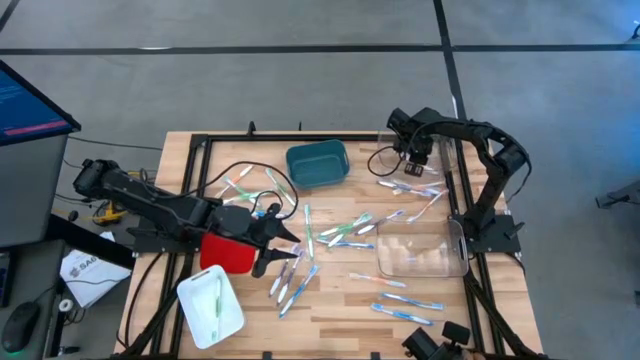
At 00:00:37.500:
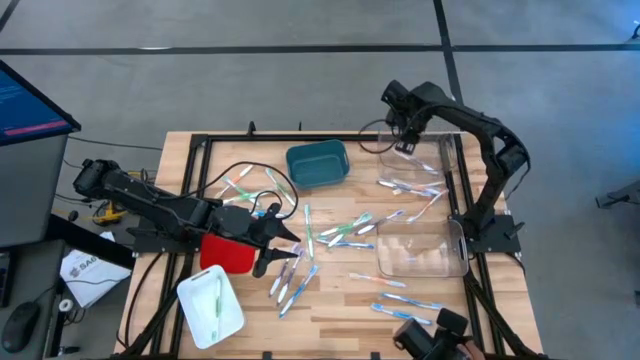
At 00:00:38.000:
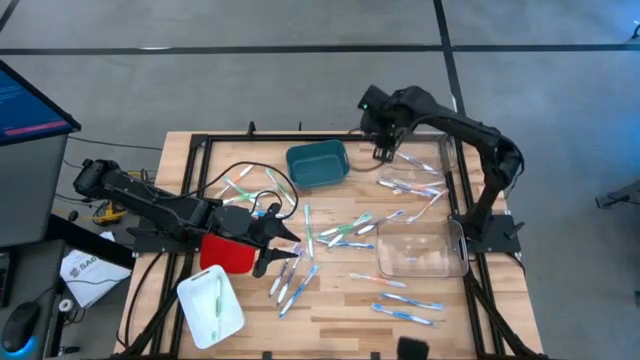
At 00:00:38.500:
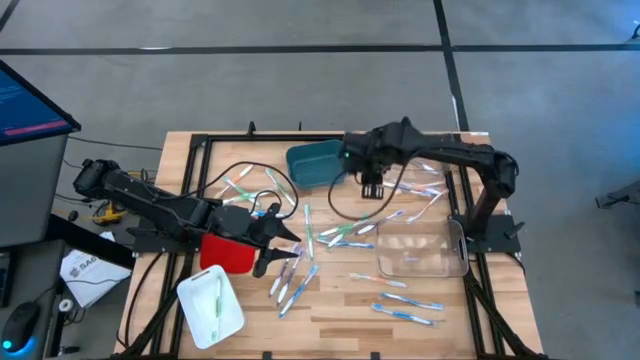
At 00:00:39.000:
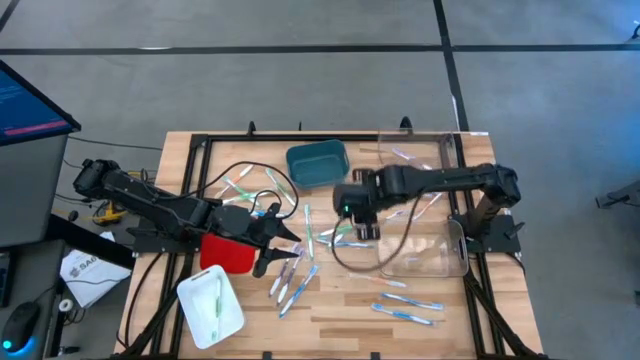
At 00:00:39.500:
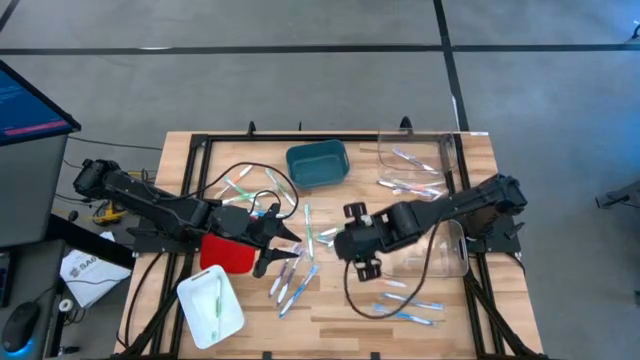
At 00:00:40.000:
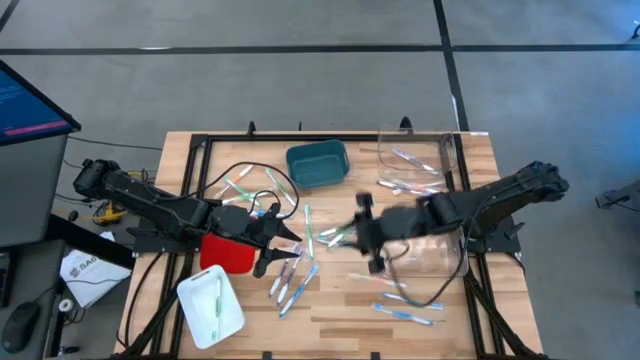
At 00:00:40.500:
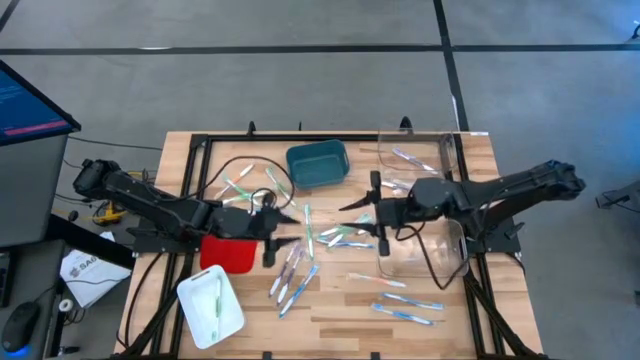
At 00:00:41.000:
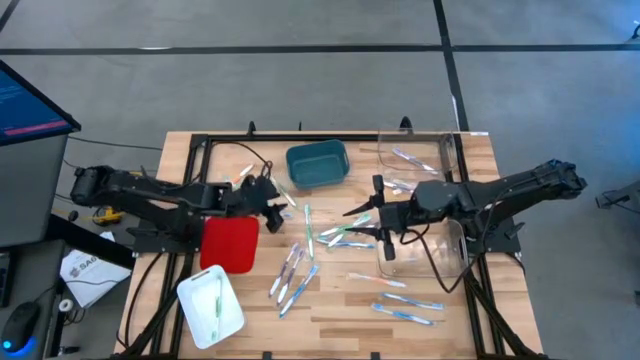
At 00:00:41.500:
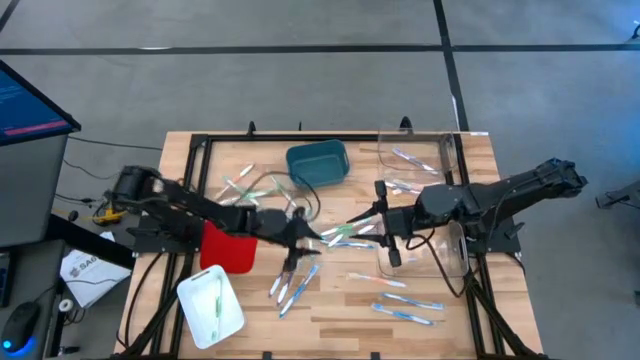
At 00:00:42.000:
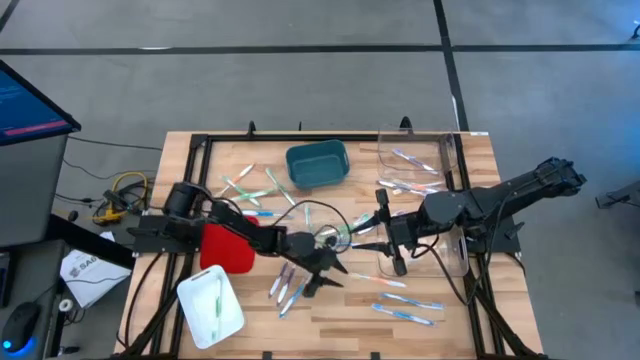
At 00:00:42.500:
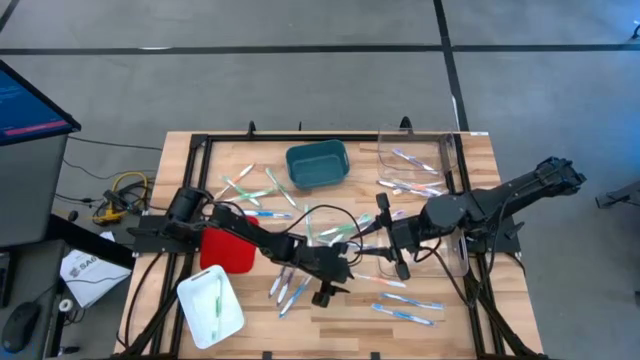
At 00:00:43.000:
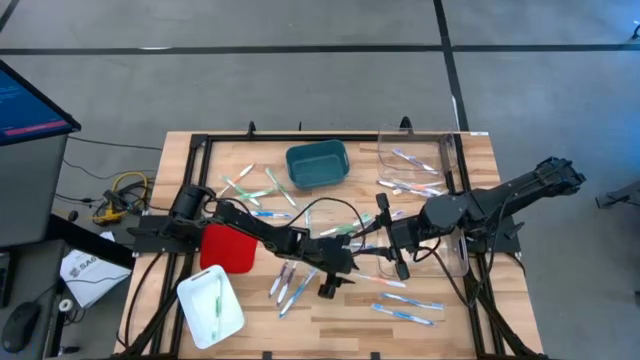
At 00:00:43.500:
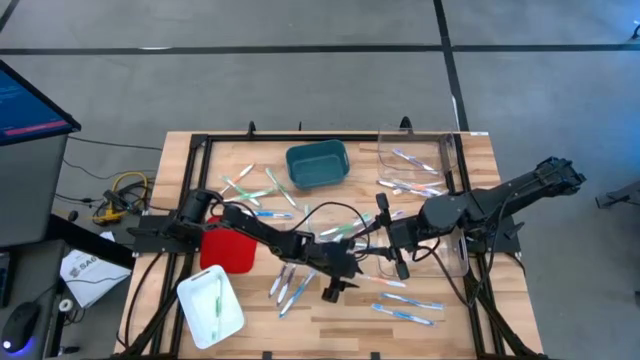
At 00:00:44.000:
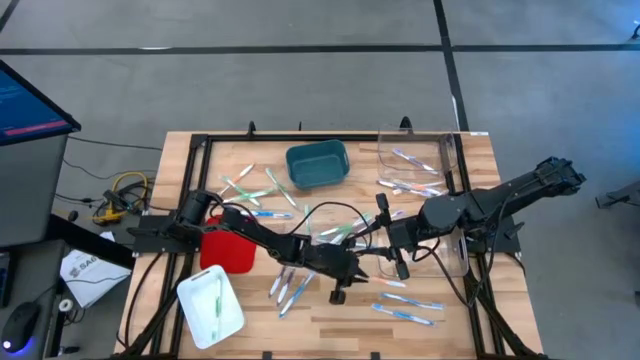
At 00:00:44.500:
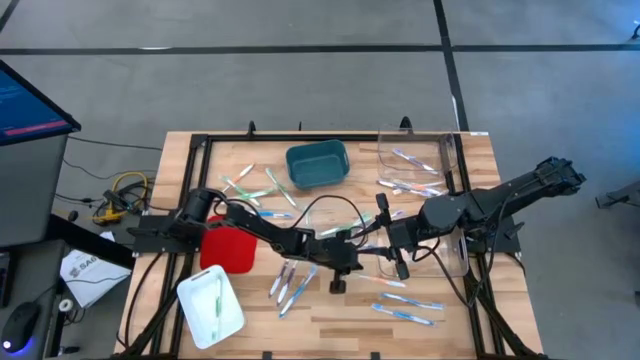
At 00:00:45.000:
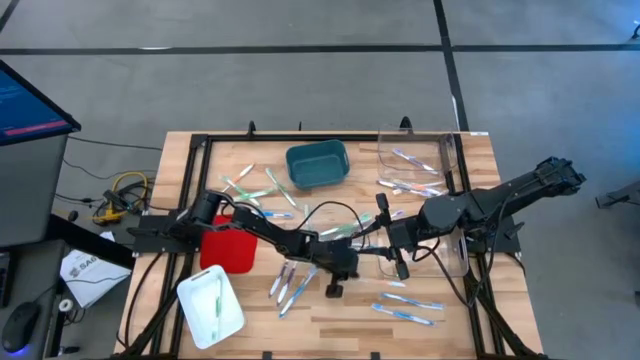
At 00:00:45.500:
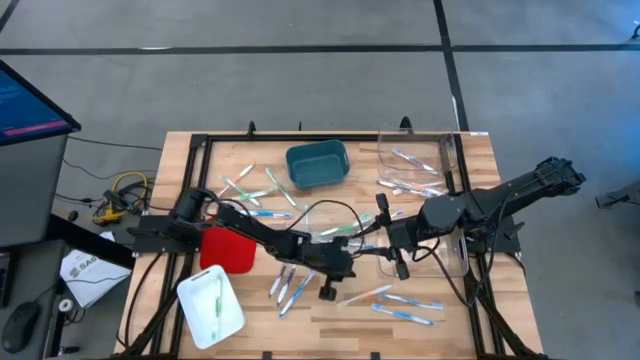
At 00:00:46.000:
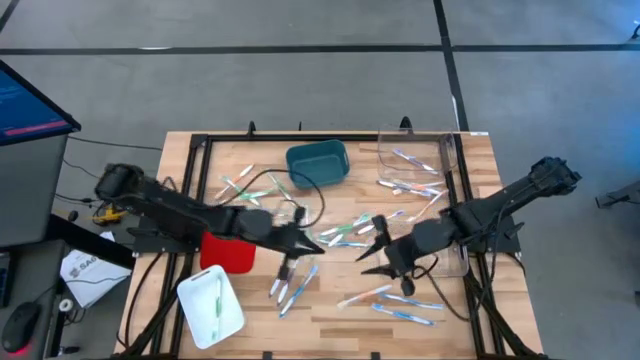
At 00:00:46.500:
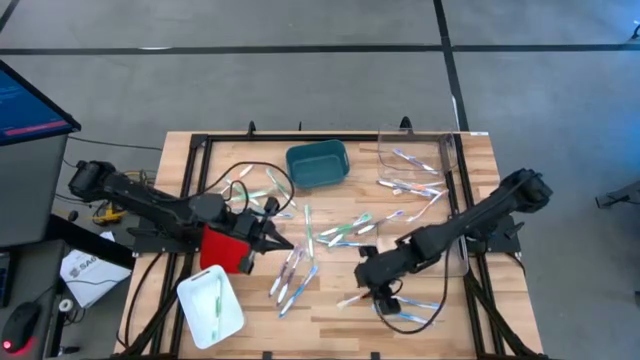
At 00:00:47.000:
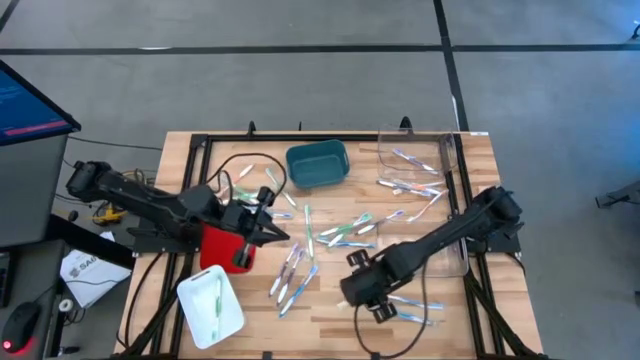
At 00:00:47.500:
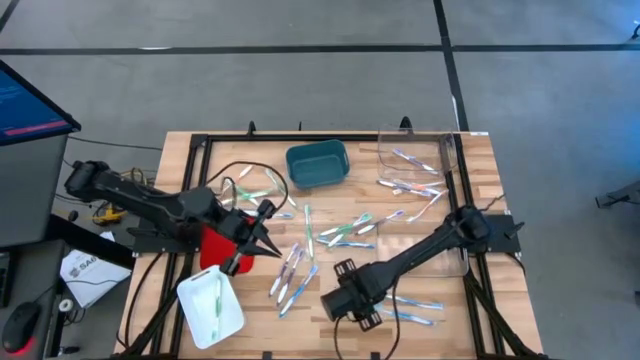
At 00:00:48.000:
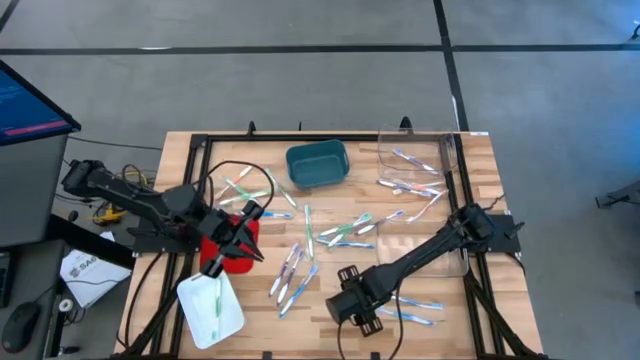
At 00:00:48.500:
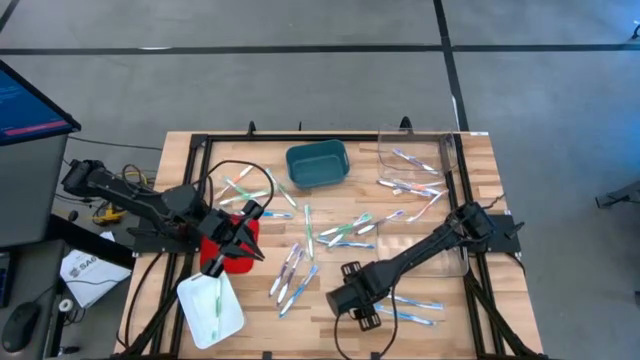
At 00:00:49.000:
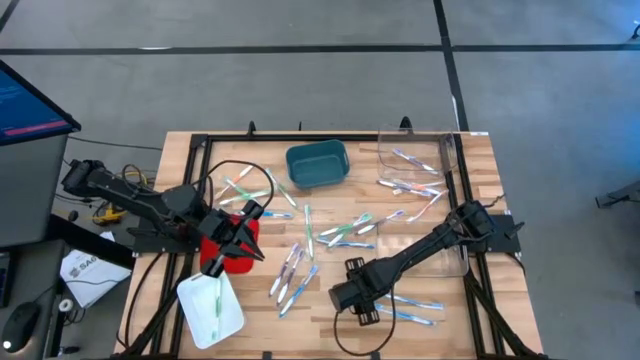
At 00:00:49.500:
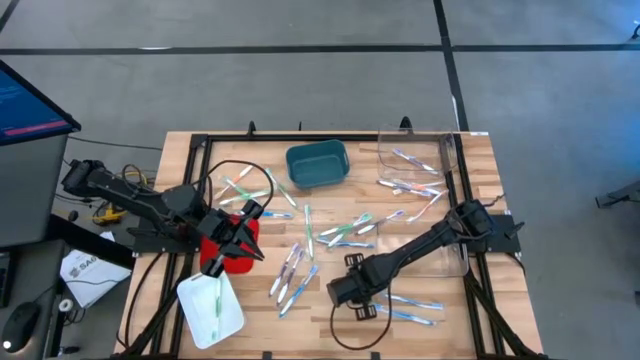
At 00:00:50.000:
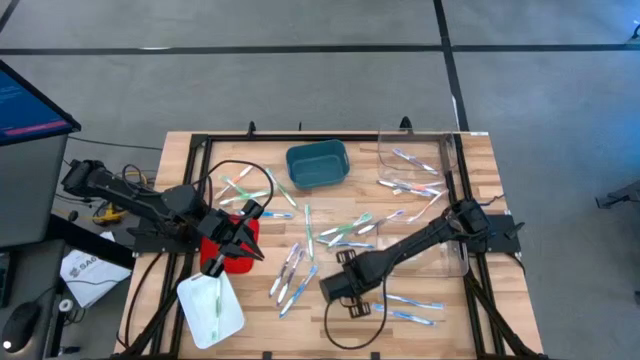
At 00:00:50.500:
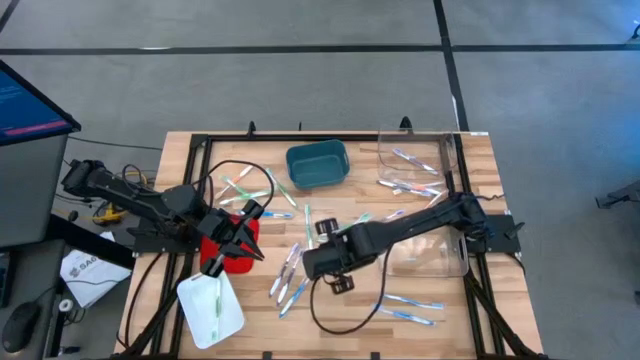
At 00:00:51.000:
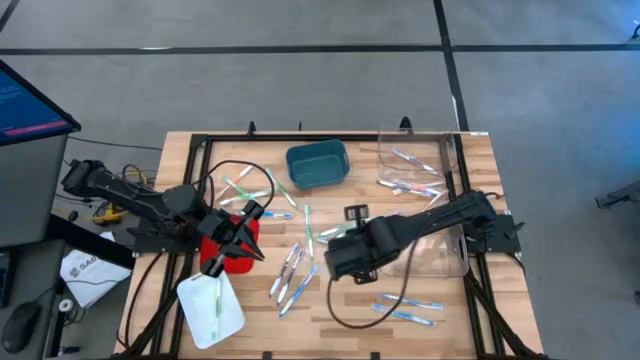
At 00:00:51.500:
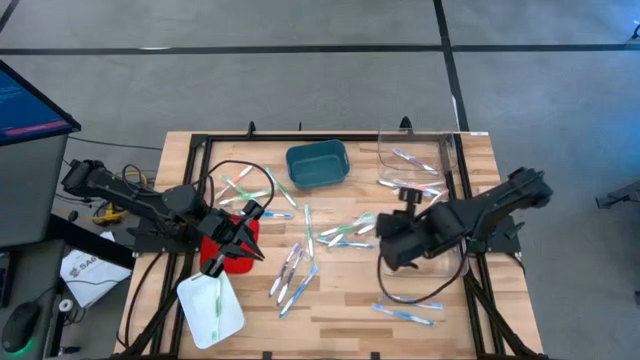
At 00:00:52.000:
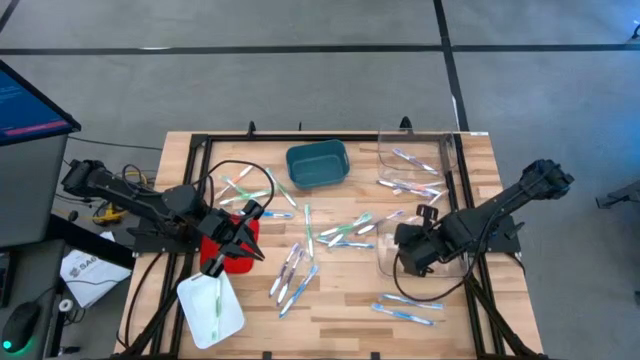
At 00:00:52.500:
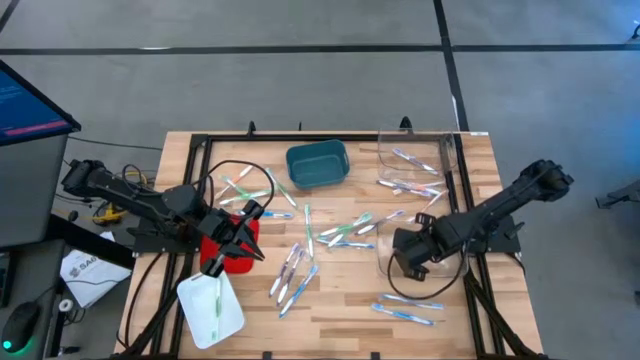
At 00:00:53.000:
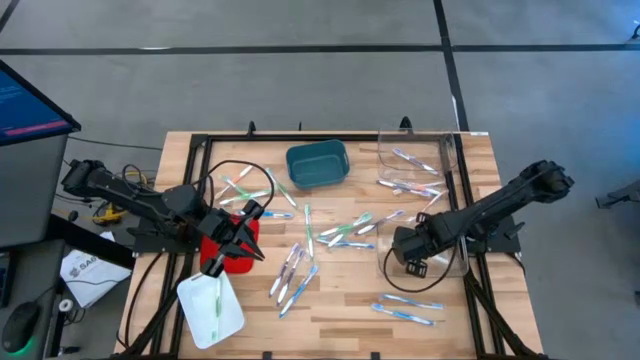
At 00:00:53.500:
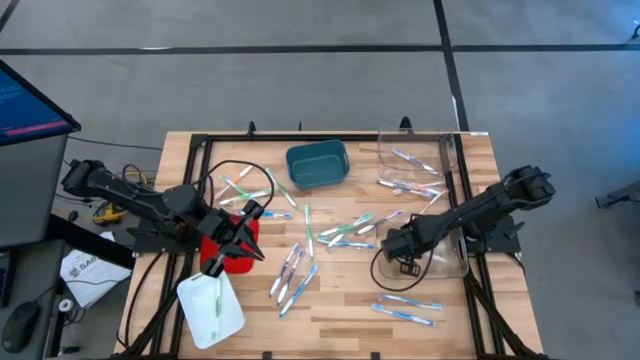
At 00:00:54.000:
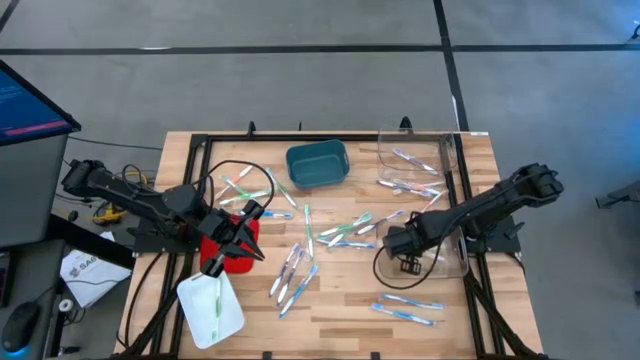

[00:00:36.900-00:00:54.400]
Task: Pick & Place Toothbrushes
Put the orange toothbrush into the bottom transparent bin

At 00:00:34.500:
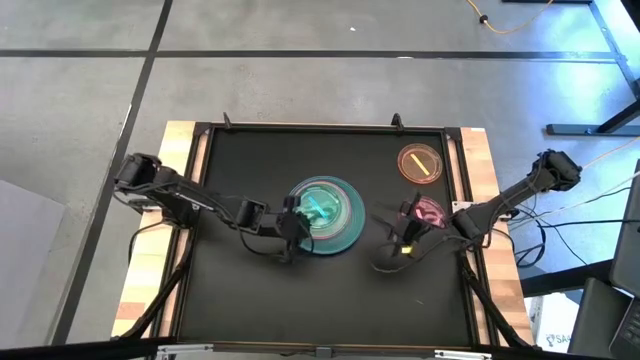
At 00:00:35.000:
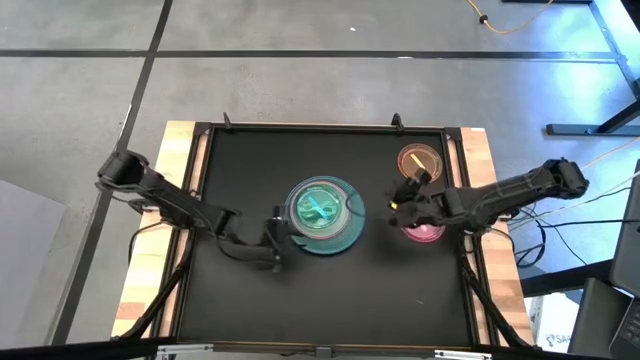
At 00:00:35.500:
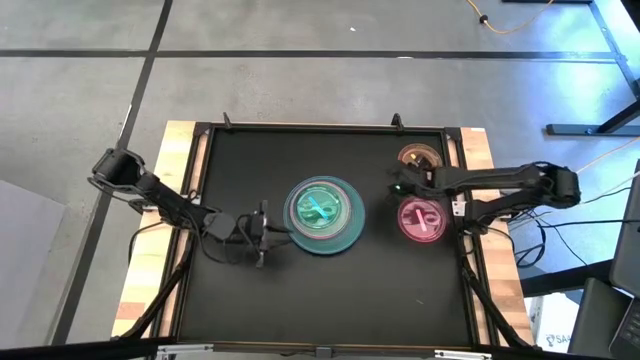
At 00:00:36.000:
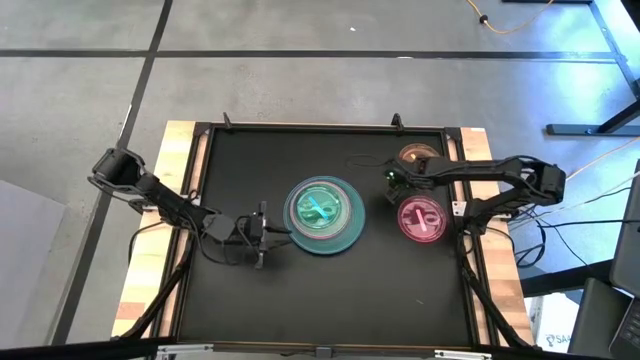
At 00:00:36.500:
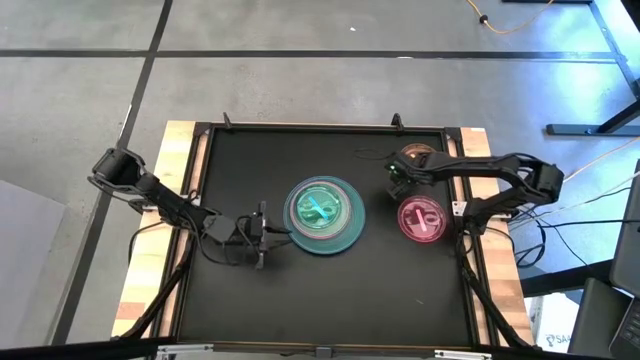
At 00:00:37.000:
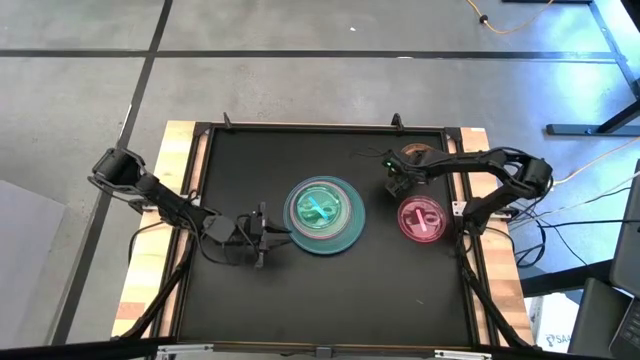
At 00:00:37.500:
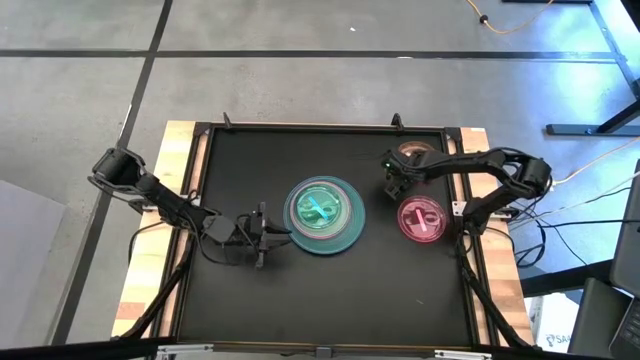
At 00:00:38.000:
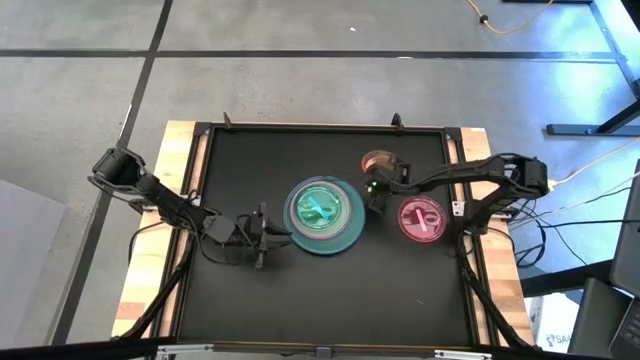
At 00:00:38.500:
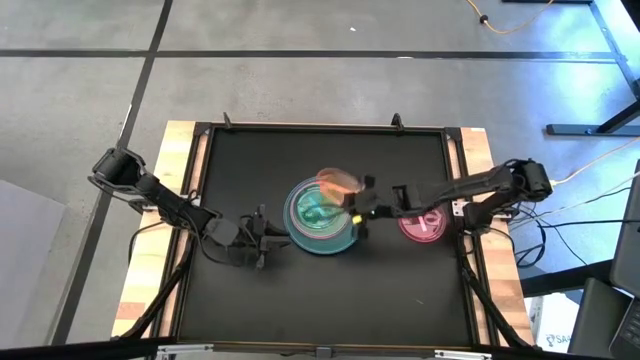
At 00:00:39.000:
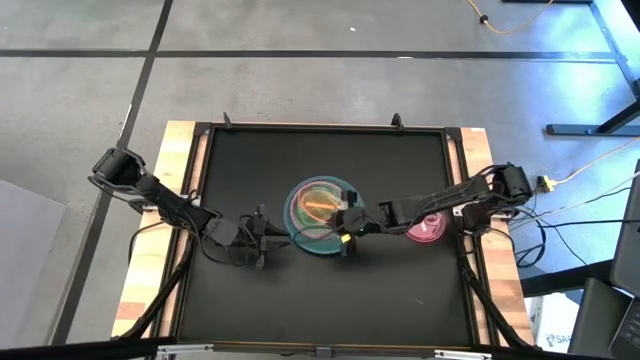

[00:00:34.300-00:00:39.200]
Task: Stack plastic plates
Stack the transparent orange plate on top of the transparent blue plate
